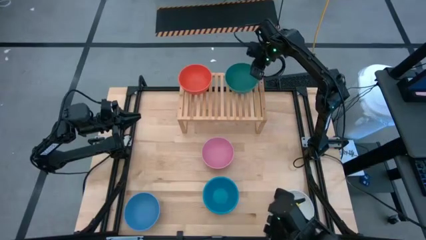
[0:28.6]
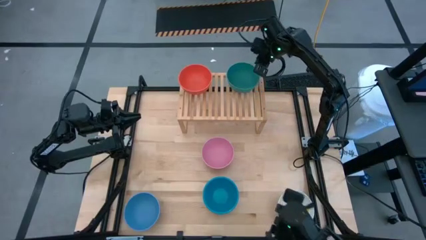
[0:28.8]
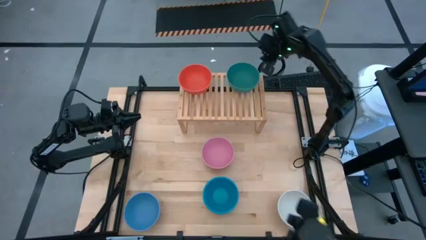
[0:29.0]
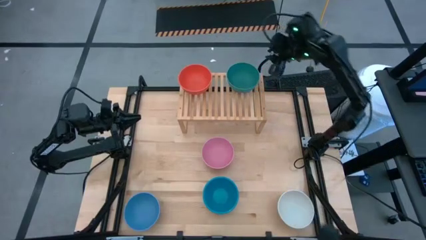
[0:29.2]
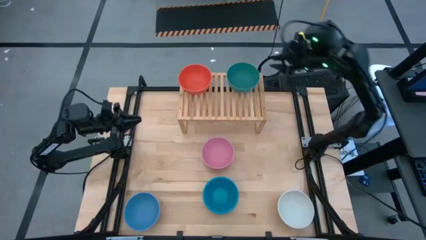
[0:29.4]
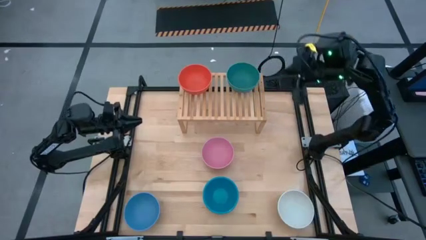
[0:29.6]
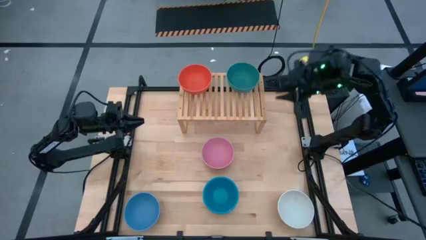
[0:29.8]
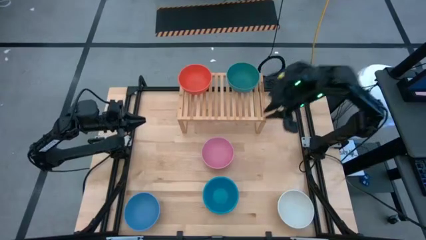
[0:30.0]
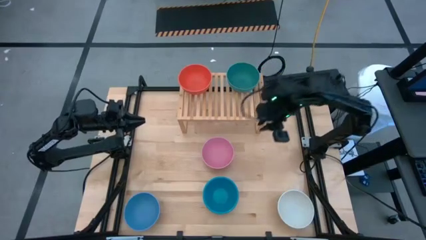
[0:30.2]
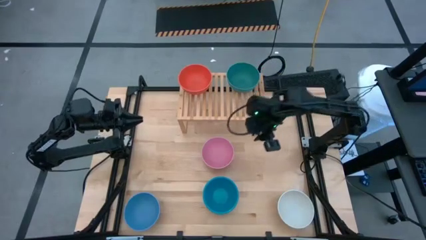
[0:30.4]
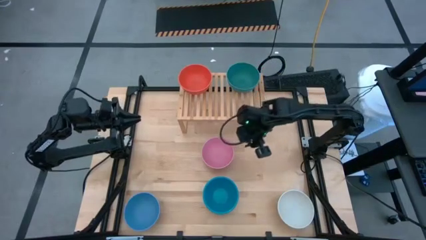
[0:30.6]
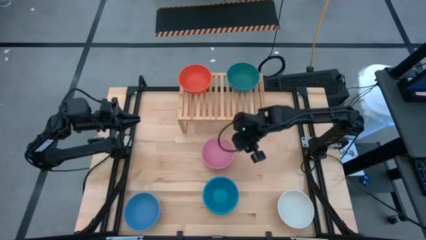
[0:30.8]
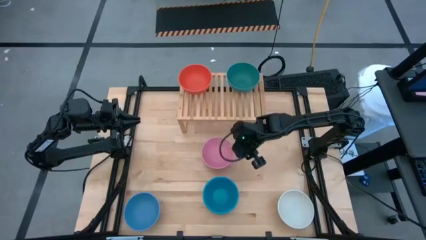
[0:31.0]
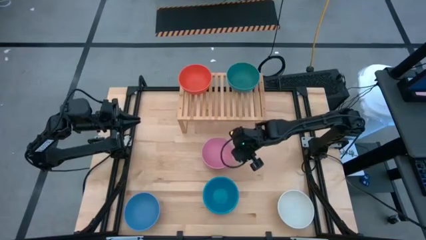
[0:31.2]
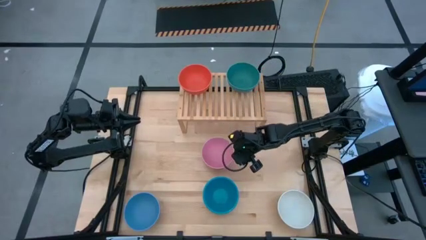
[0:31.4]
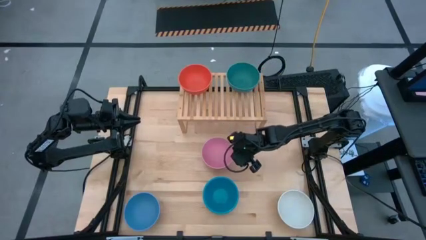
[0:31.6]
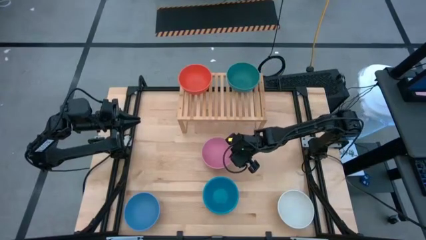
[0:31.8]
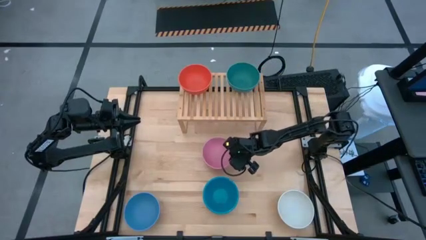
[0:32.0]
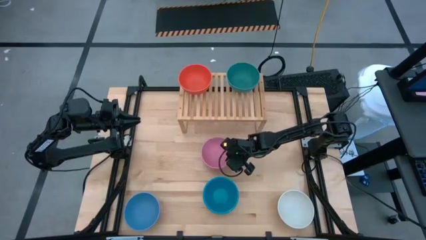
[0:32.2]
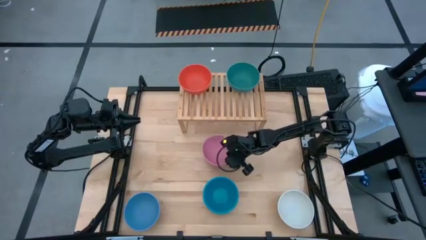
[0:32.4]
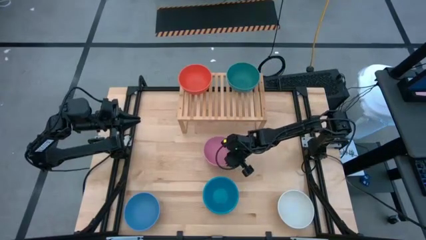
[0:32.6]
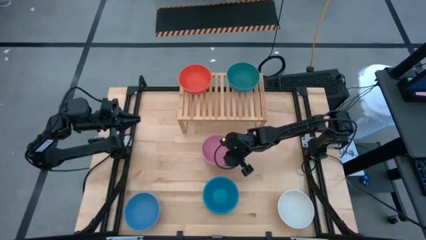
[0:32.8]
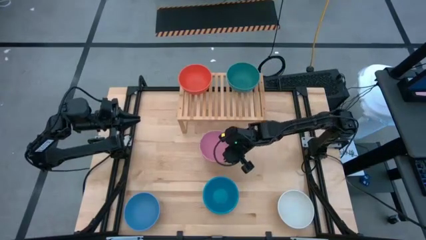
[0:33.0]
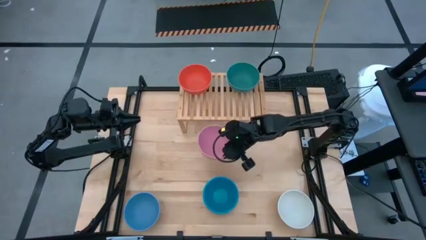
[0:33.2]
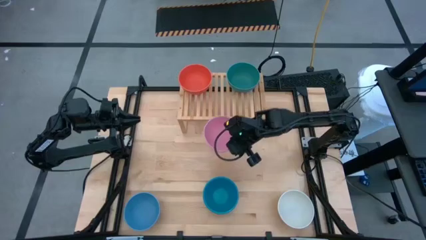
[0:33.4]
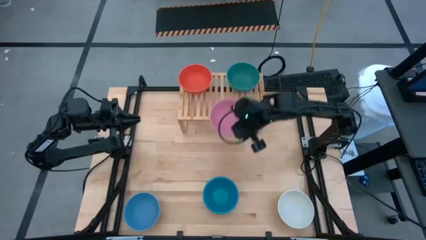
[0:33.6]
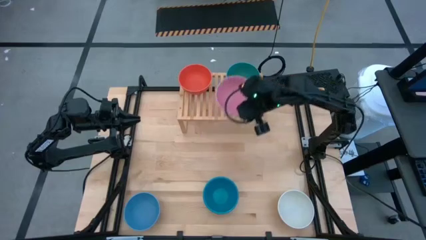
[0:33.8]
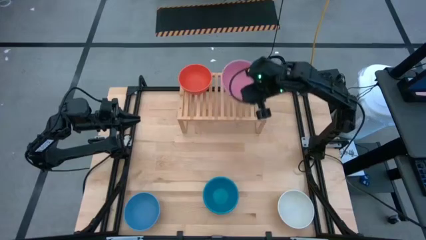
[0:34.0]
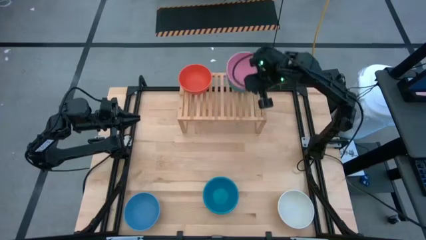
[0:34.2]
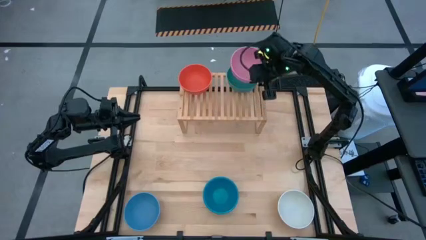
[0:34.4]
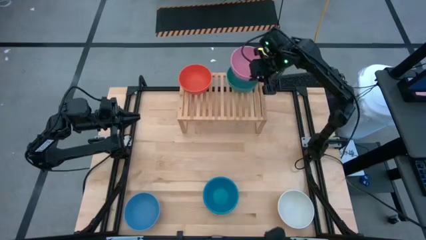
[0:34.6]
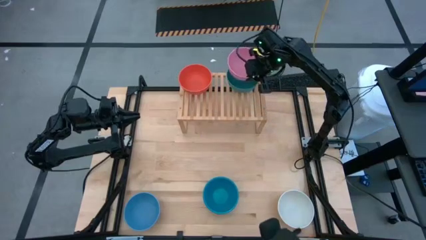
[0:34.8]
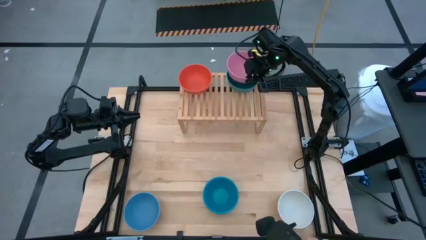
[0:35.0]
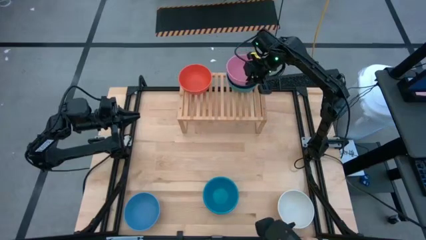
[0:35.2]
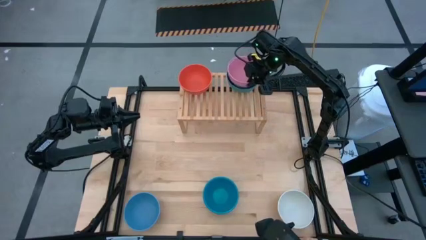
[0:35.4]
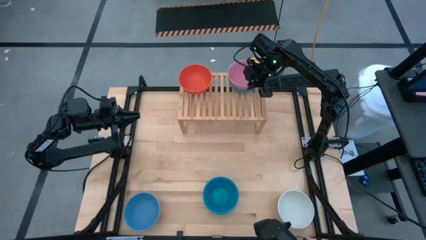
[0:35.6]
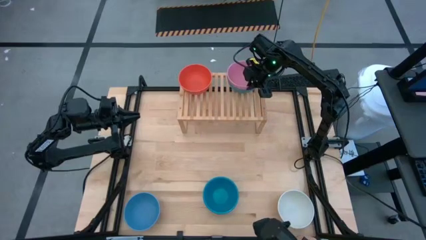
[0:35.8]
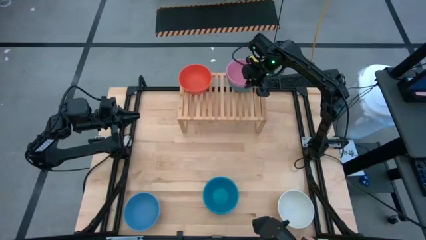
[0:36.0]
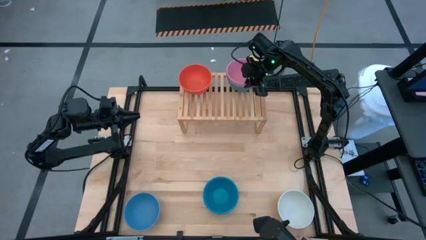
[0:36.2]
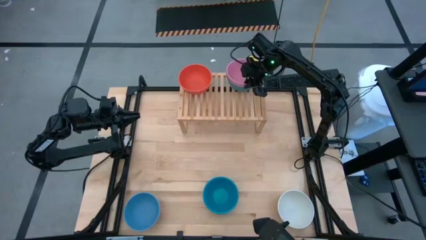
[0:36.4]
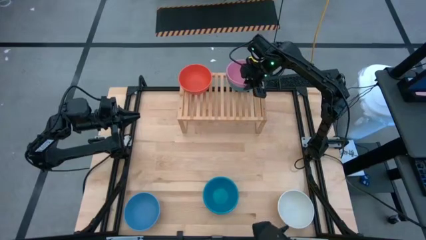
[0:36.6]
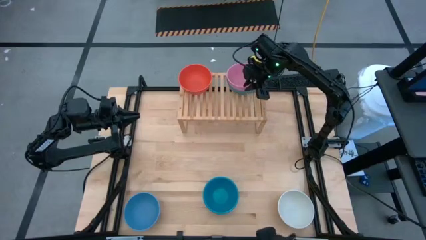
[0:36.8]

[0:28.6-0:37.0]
Task: Place and stack bowls onto a shelf
Stack the pink bowl on the green bowl on the shelf

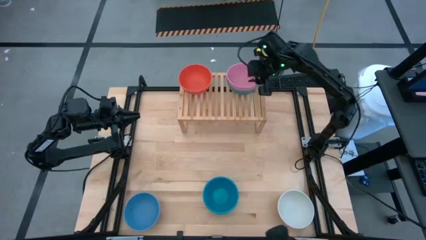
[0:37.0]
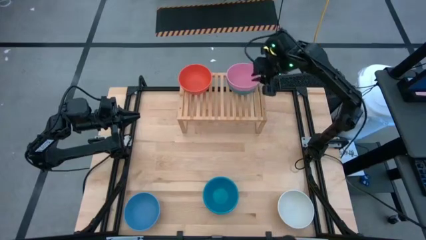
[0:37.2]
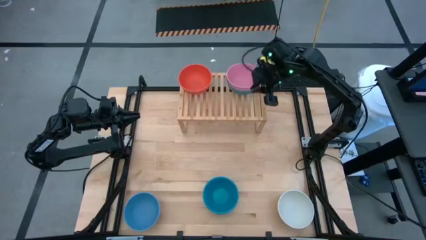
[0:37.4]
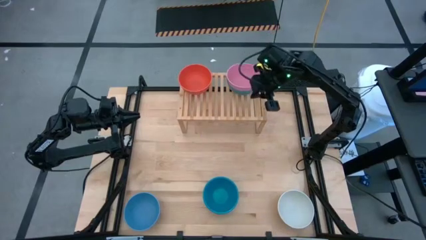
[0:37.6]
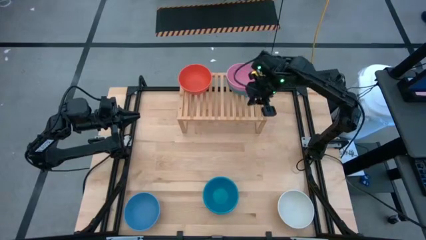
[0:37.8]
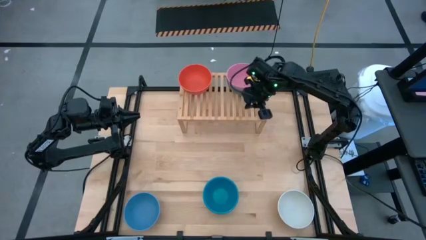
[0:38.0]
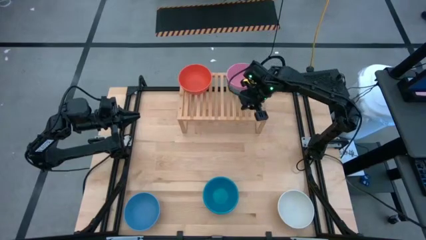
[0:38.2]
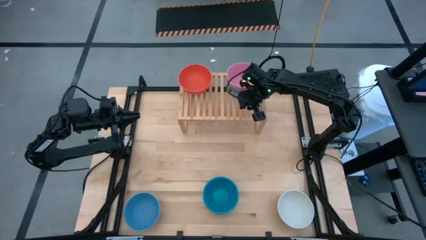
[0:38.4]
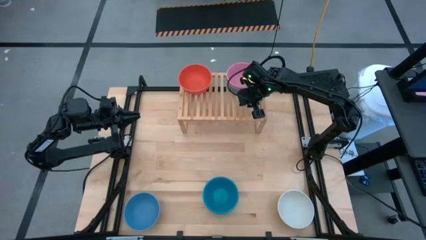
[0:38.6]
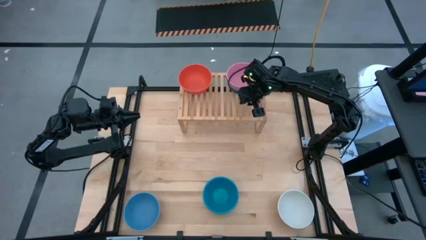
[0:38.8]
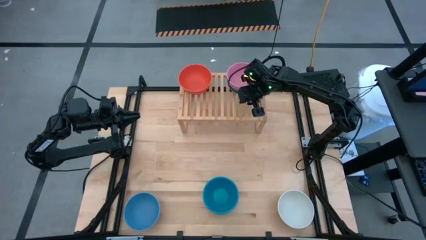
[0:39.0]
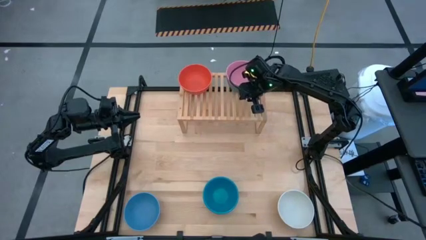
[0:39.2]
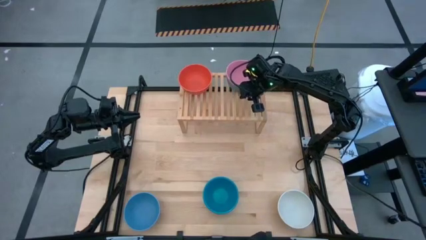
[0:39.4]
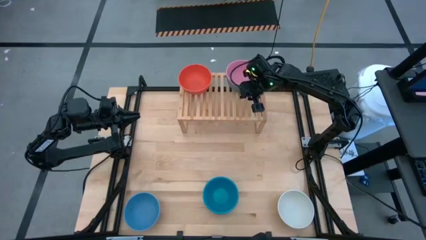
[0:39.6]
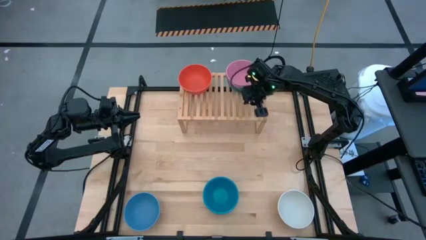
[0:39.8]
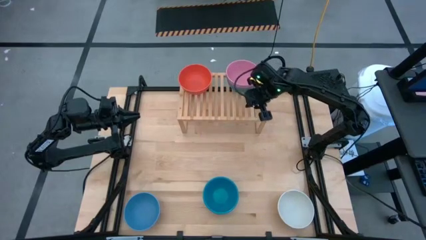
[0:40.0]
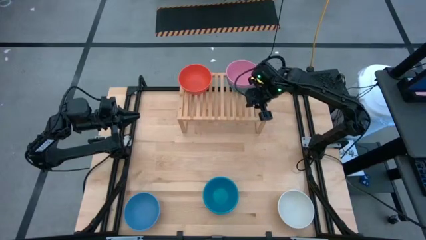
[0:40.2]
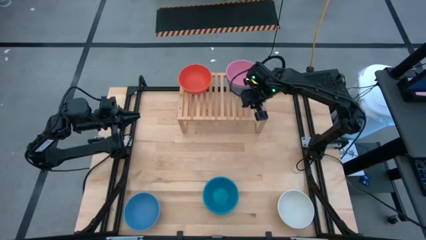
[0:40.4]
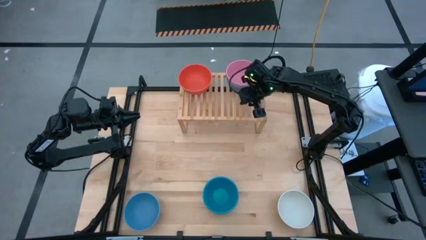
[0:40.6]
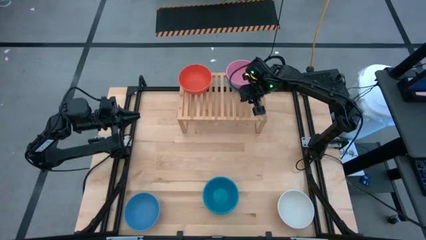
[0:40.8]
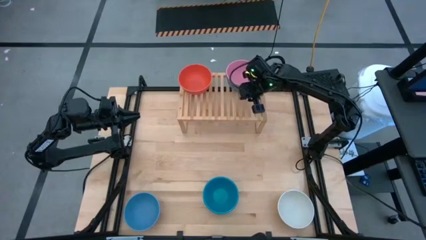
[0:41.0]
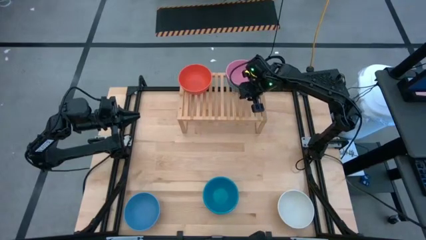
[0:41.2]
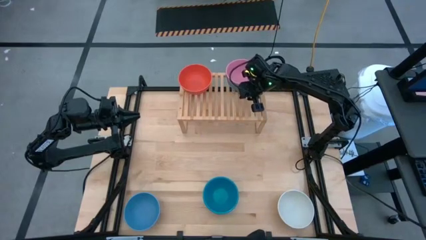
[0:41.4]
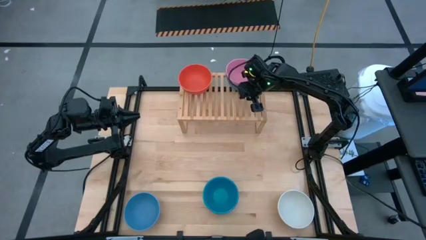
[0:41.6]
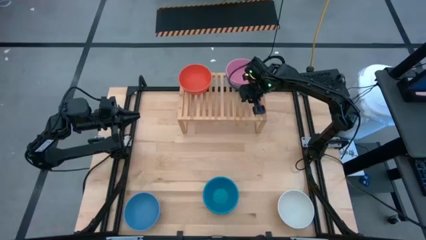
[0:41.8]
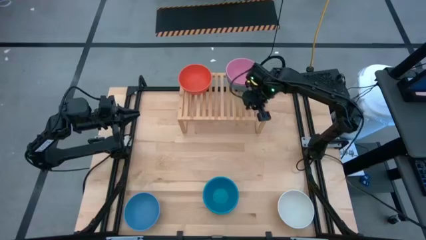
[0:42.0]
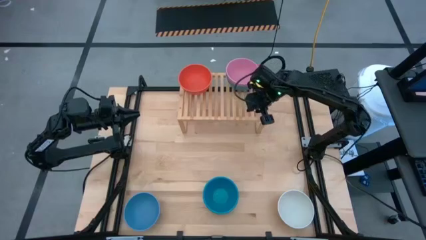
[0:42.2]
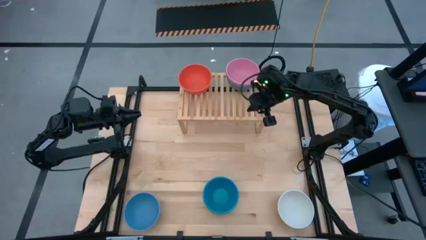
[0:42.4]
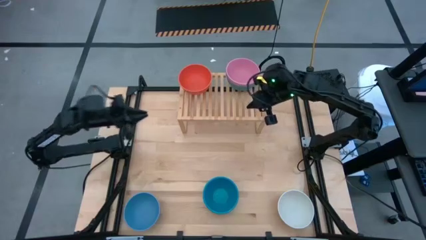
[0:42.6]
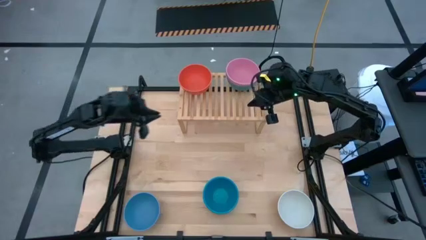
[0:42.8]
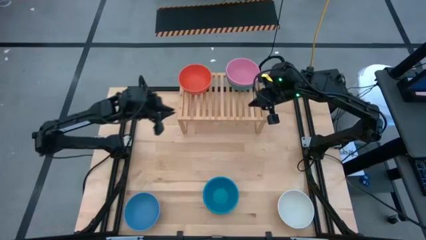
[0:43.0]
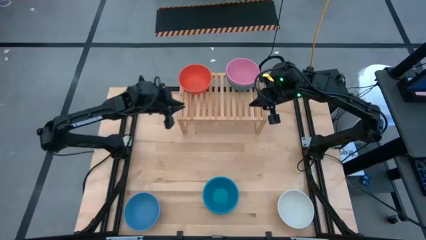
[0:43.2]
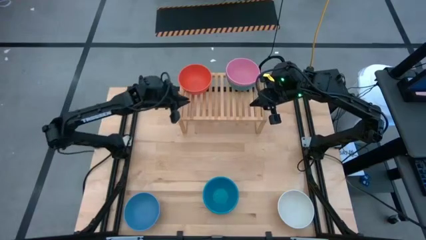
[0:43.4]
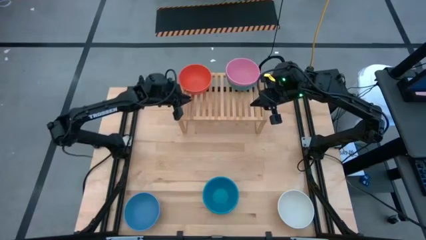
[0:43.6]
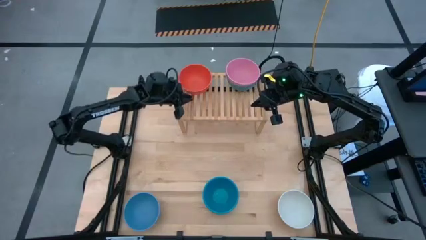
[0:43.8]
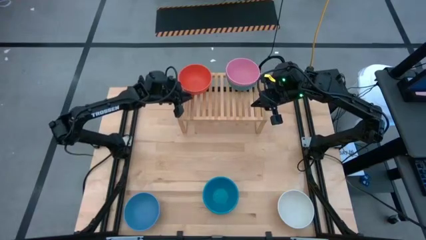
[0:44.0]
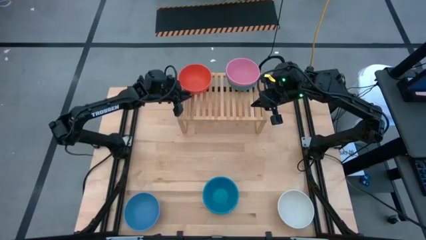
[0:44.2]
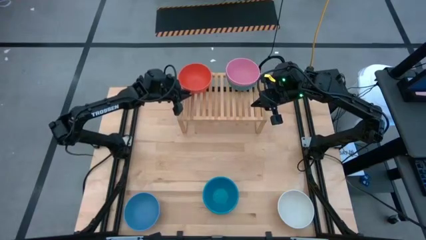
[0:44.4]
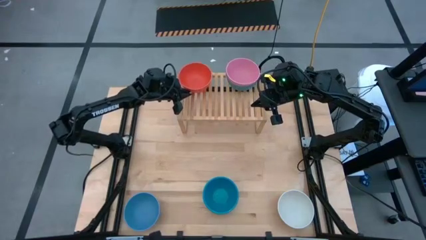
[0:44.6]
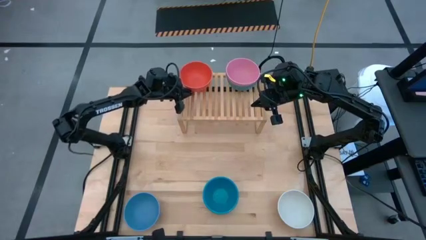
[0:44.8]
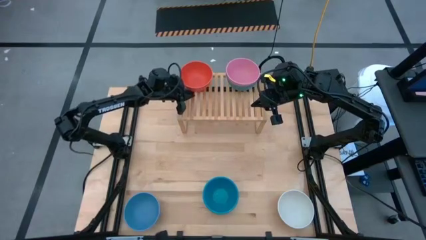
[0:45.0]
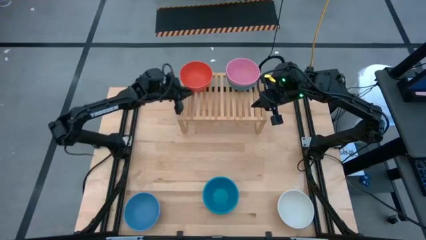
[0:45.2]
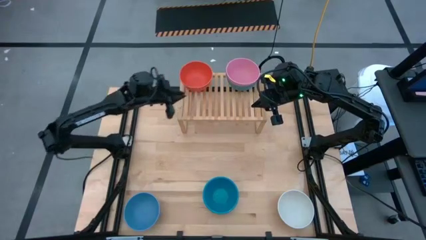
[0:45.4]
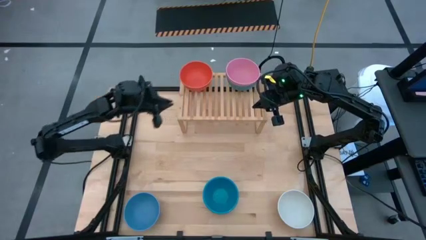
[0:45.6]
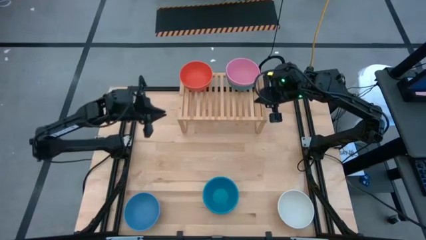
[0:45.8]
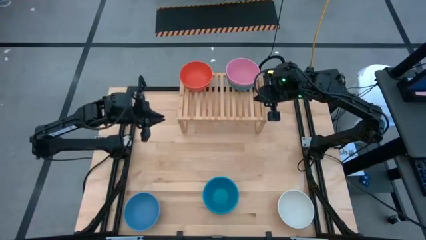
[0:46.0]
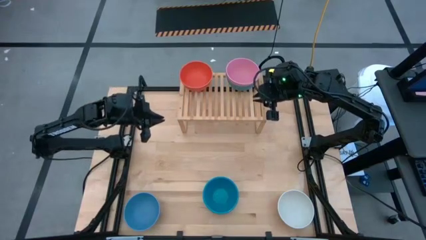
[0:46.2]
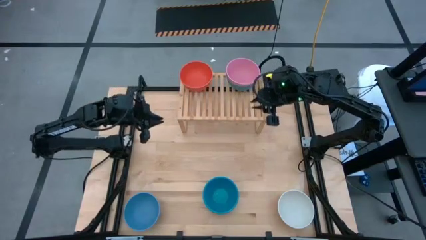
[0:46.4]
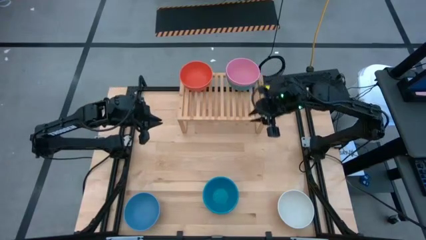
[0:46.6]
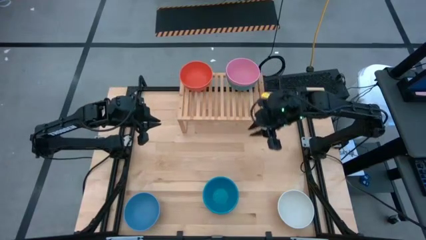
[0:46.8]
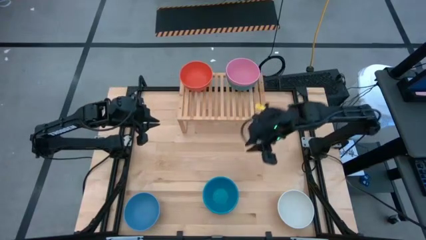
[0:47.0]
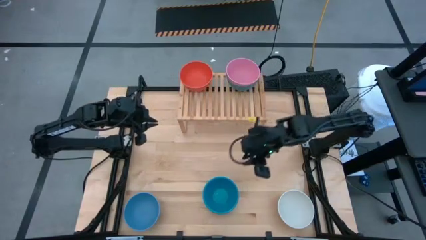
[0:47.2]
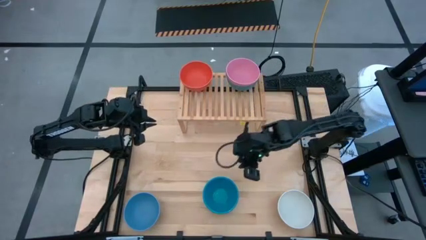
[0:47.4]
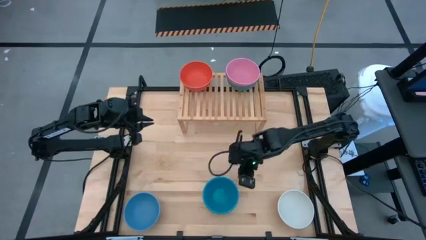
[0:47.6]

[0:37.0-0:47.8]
Put the dark blue bowl on the shelf
